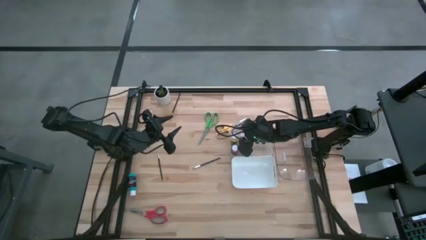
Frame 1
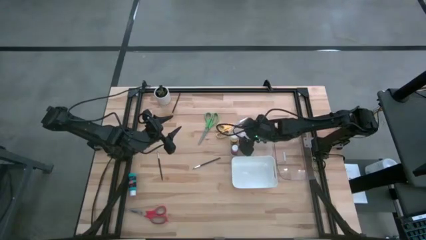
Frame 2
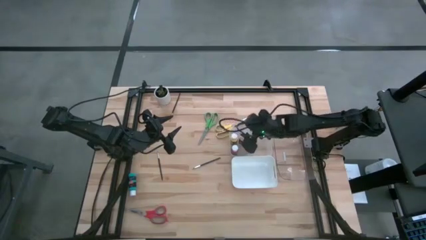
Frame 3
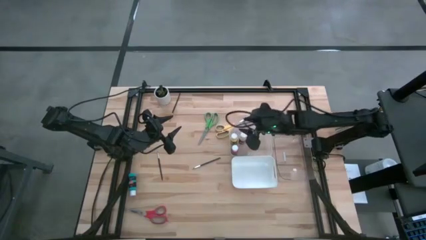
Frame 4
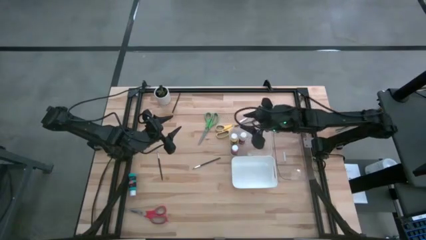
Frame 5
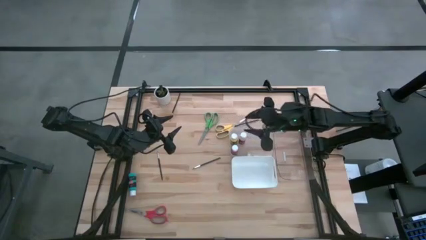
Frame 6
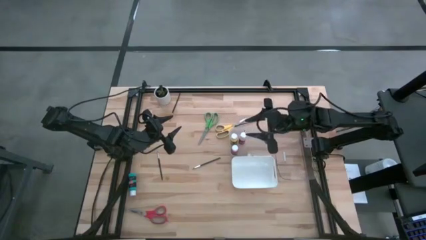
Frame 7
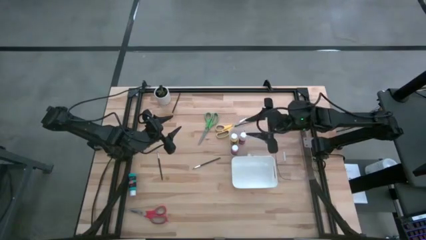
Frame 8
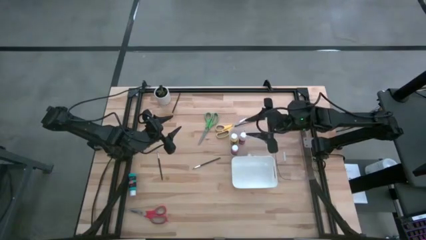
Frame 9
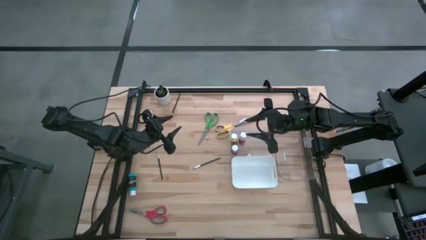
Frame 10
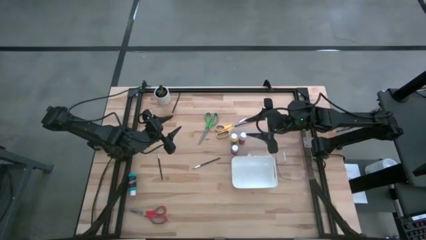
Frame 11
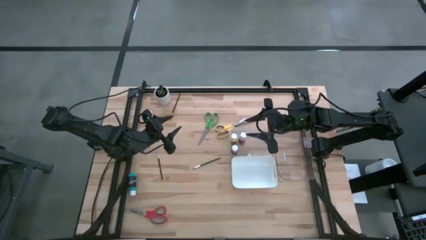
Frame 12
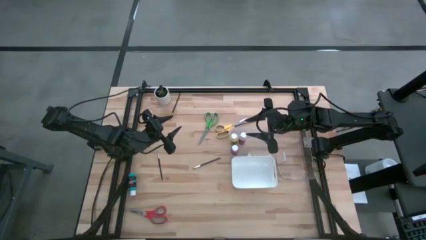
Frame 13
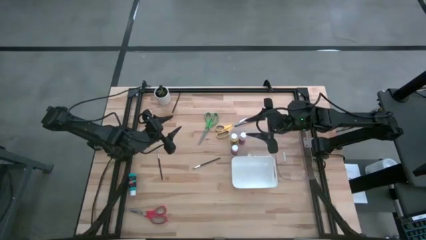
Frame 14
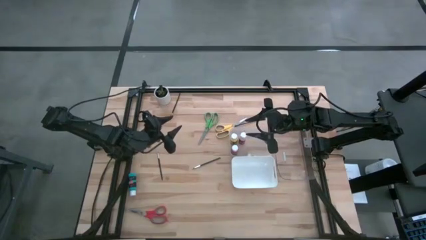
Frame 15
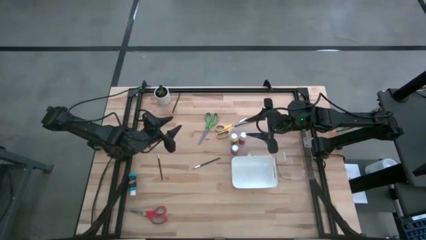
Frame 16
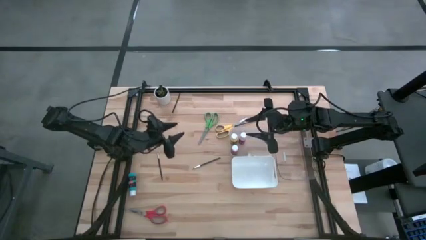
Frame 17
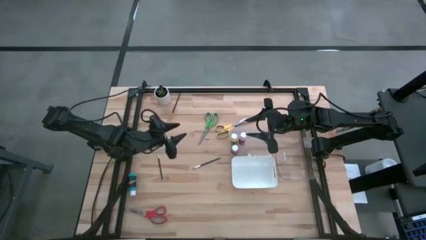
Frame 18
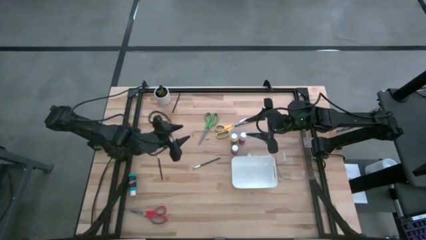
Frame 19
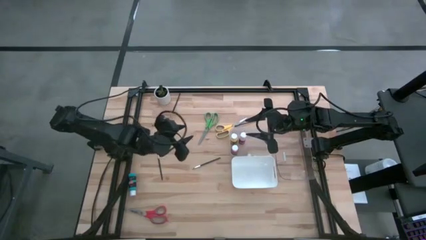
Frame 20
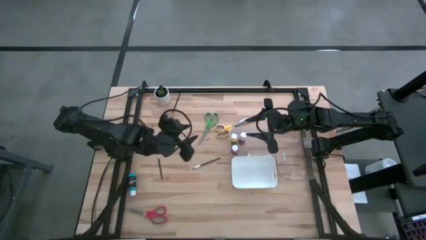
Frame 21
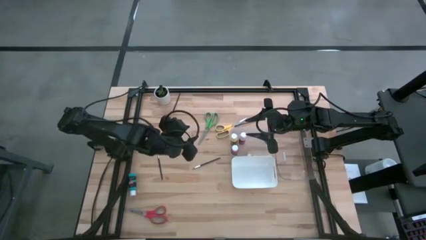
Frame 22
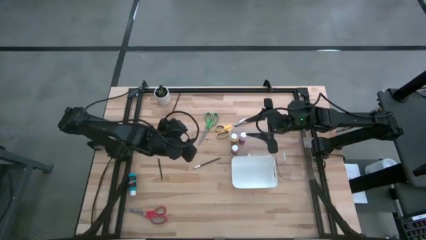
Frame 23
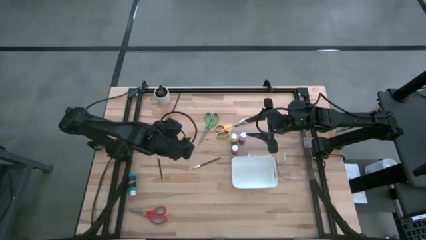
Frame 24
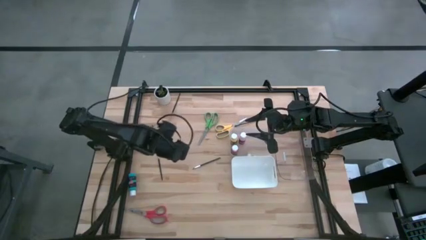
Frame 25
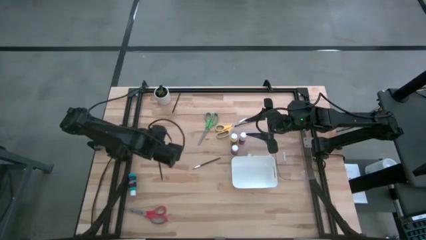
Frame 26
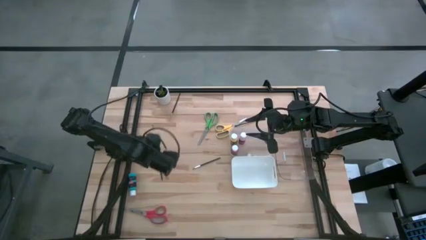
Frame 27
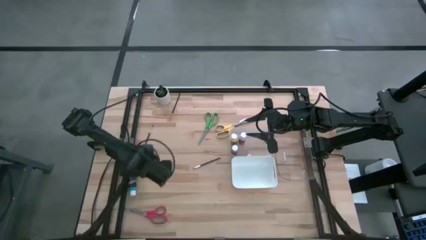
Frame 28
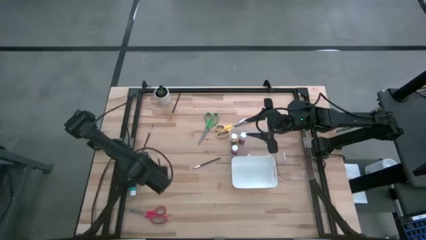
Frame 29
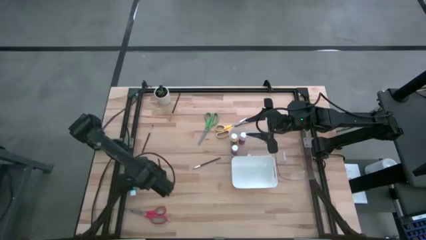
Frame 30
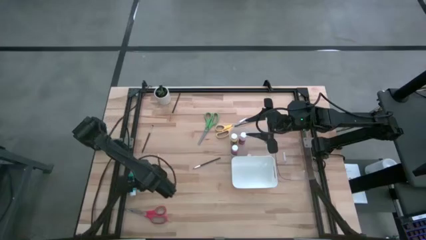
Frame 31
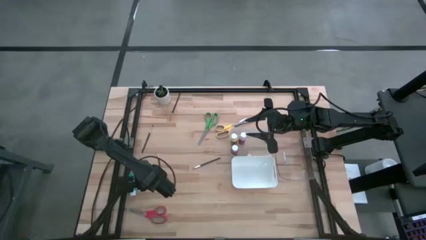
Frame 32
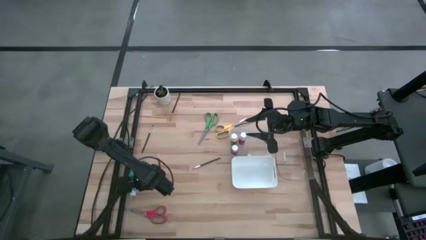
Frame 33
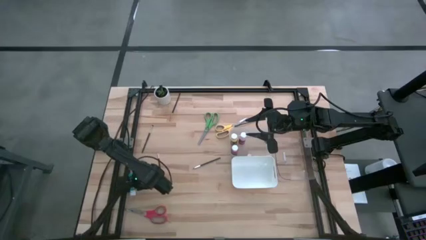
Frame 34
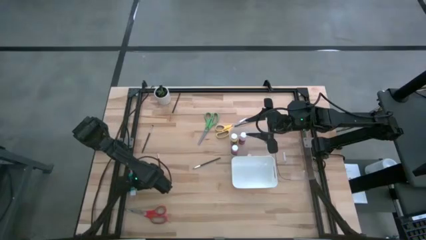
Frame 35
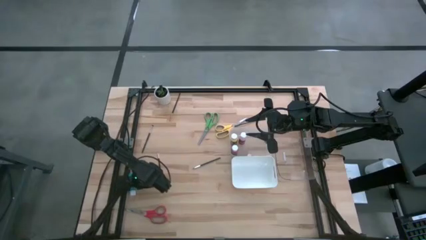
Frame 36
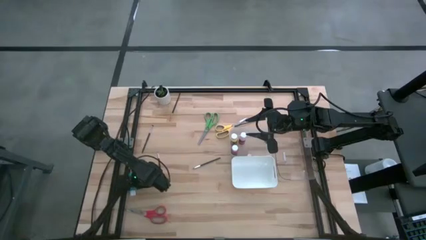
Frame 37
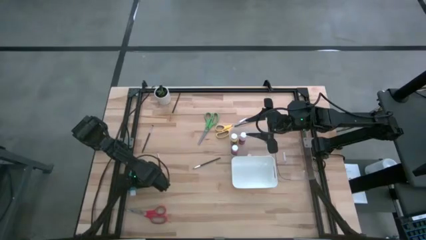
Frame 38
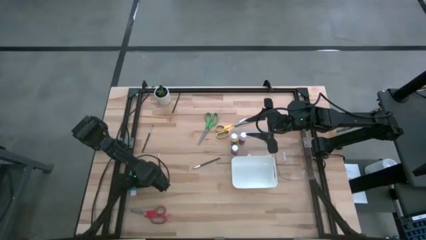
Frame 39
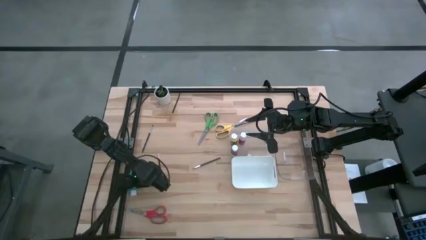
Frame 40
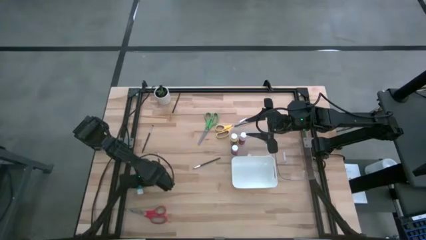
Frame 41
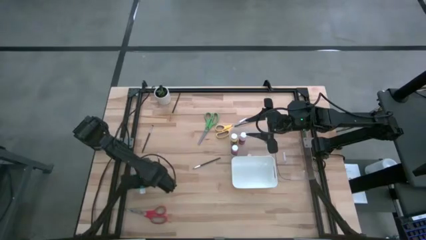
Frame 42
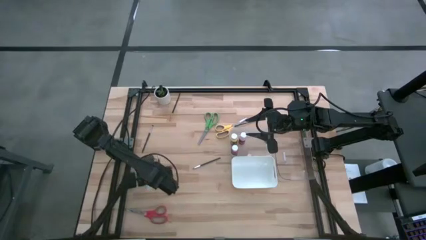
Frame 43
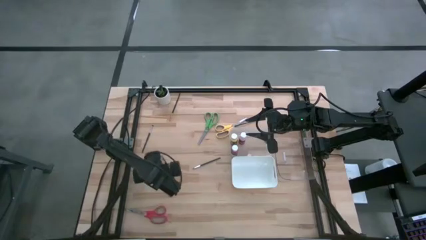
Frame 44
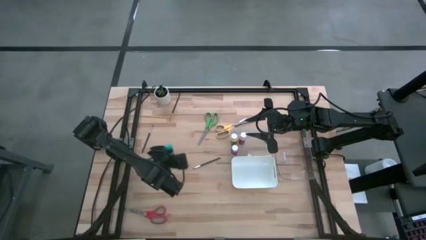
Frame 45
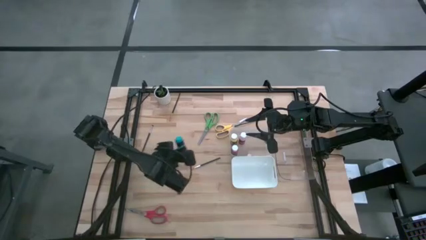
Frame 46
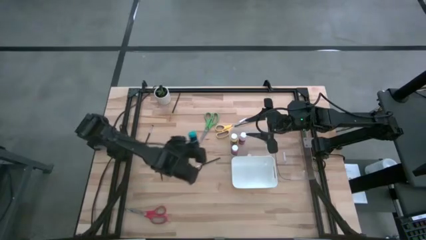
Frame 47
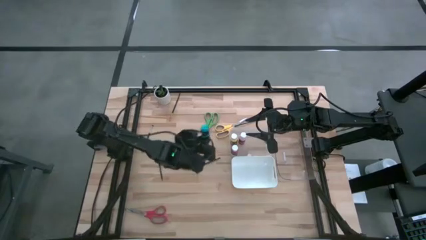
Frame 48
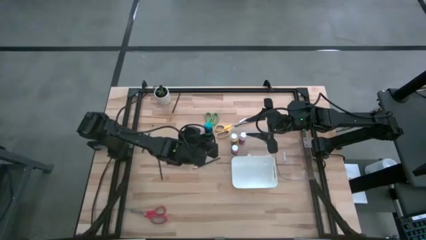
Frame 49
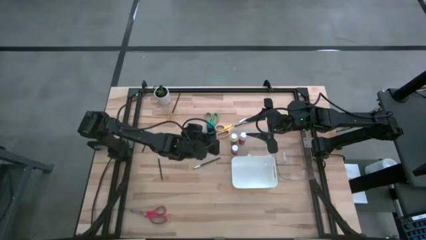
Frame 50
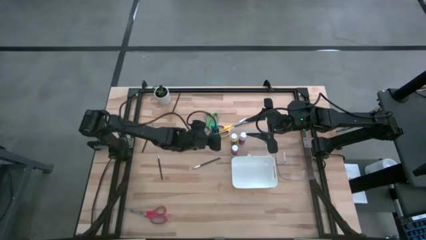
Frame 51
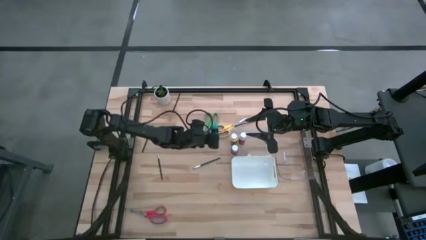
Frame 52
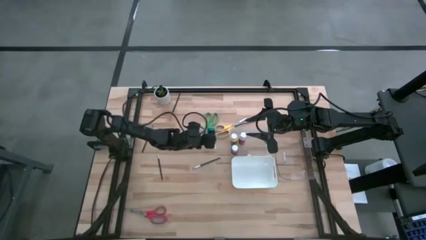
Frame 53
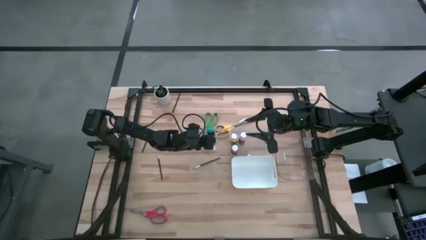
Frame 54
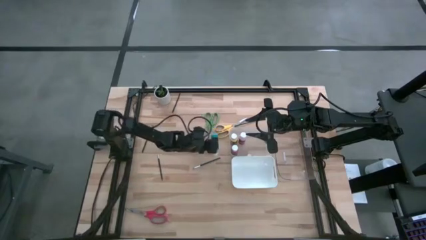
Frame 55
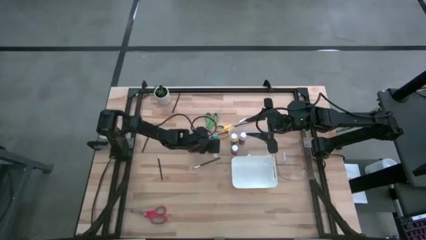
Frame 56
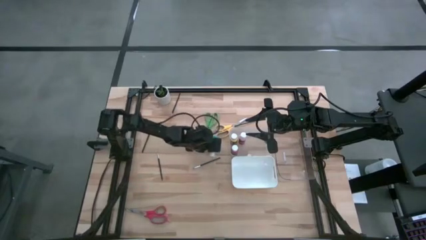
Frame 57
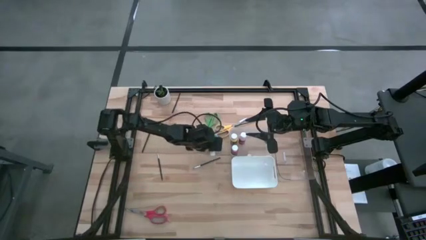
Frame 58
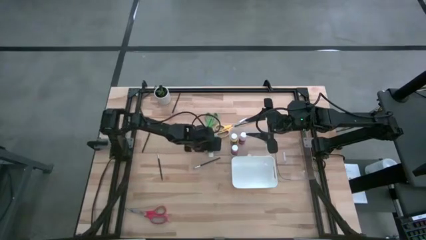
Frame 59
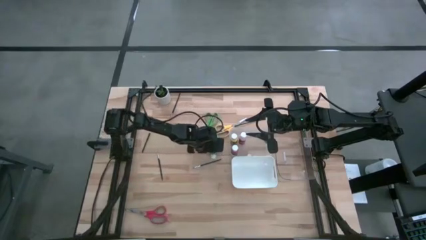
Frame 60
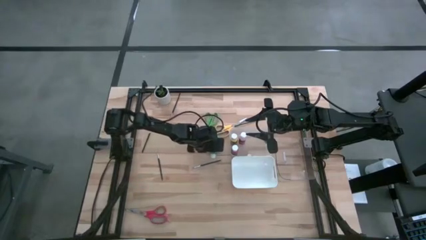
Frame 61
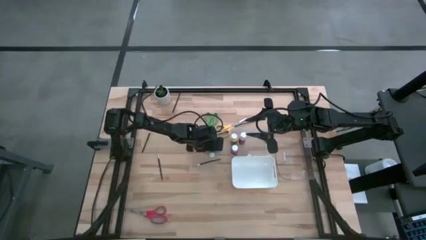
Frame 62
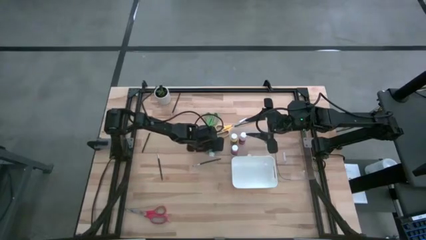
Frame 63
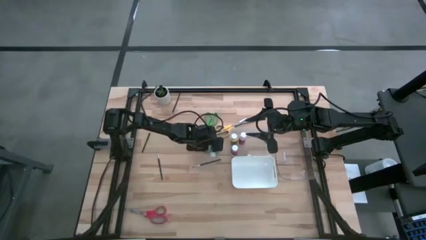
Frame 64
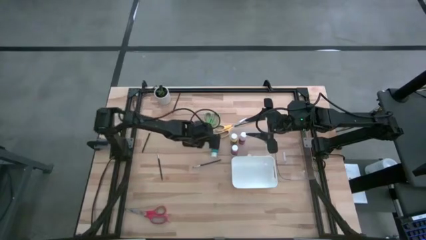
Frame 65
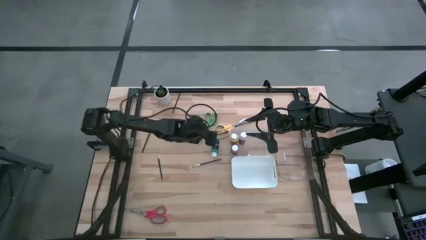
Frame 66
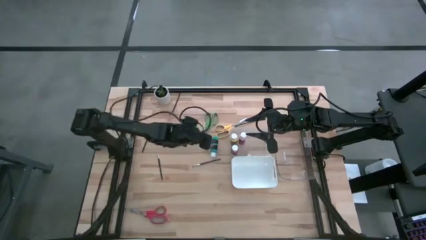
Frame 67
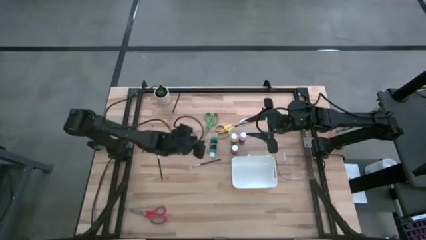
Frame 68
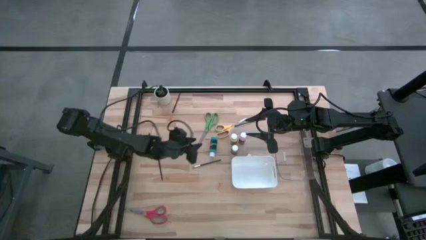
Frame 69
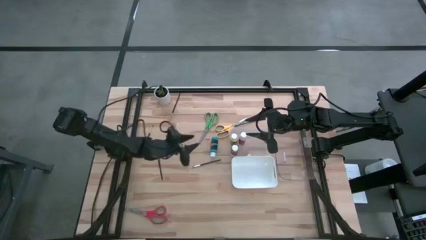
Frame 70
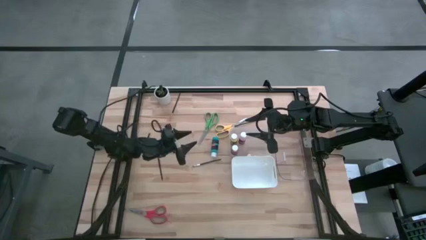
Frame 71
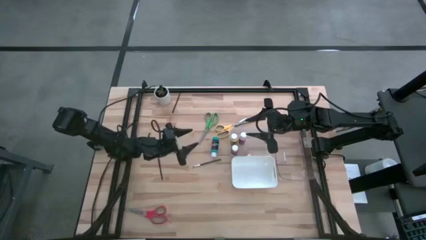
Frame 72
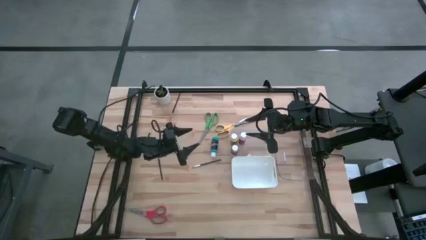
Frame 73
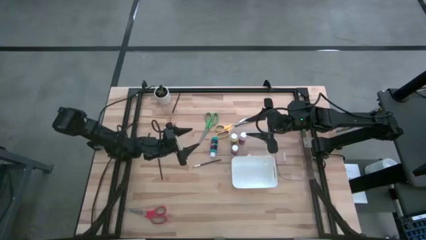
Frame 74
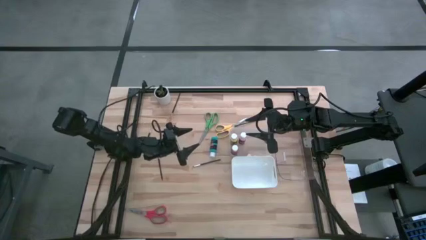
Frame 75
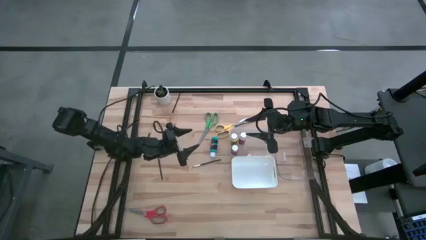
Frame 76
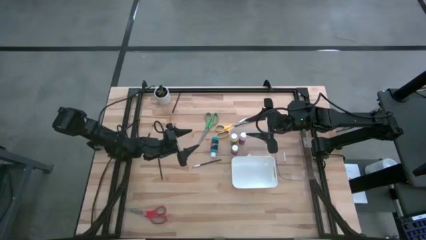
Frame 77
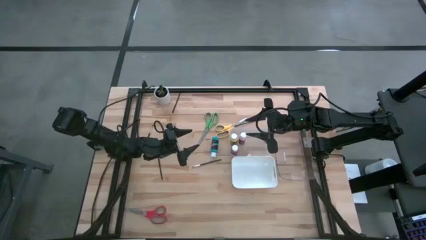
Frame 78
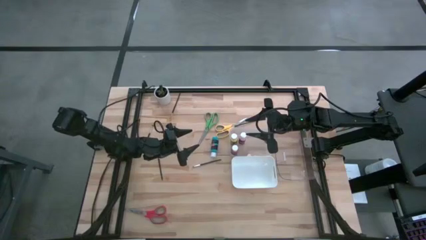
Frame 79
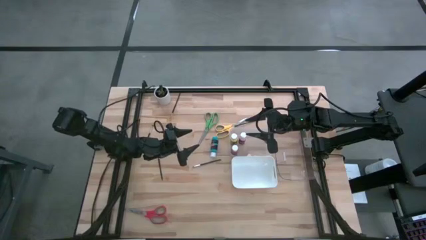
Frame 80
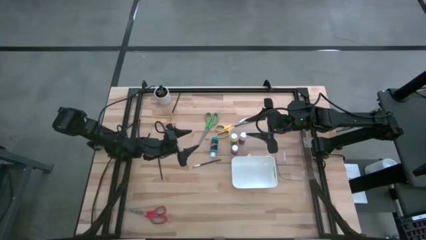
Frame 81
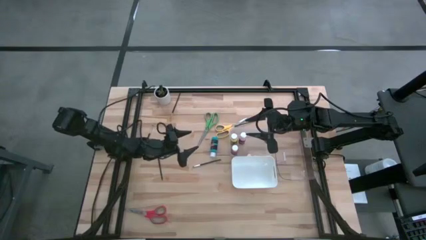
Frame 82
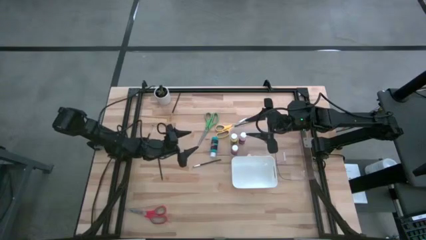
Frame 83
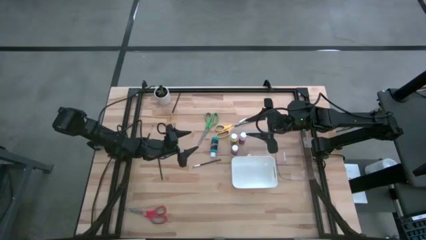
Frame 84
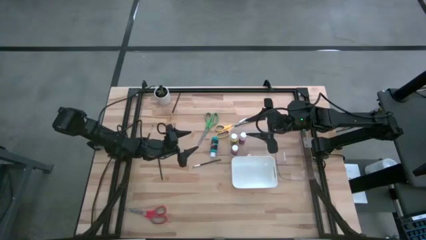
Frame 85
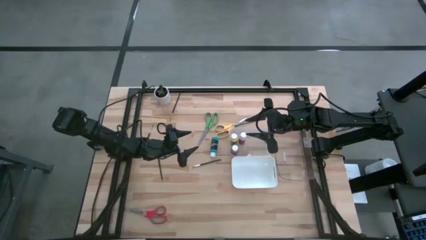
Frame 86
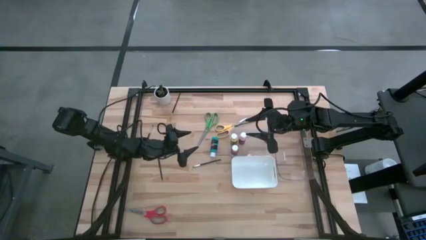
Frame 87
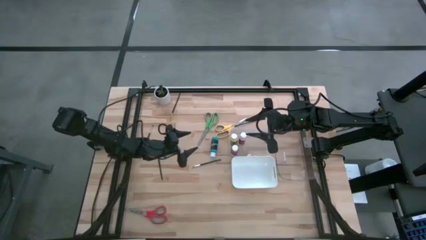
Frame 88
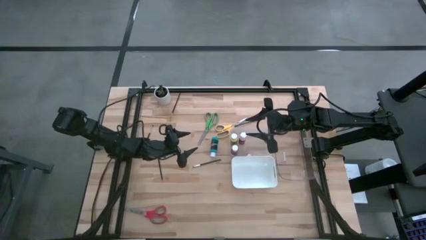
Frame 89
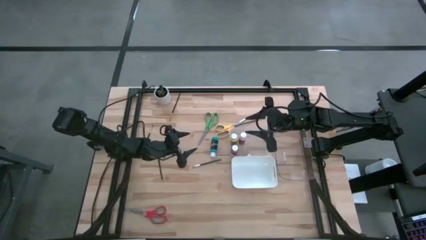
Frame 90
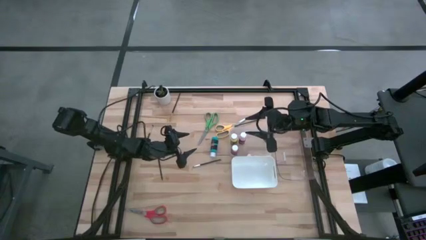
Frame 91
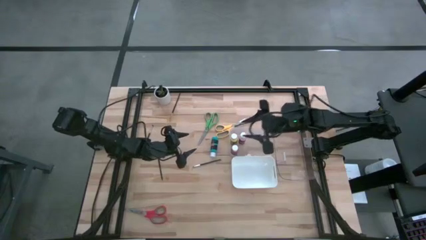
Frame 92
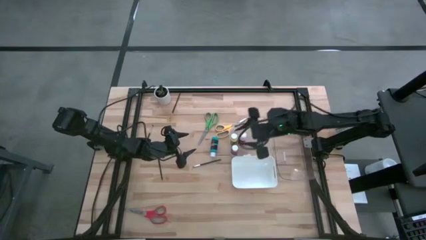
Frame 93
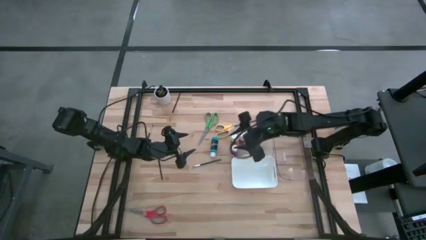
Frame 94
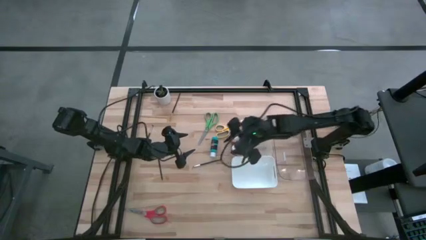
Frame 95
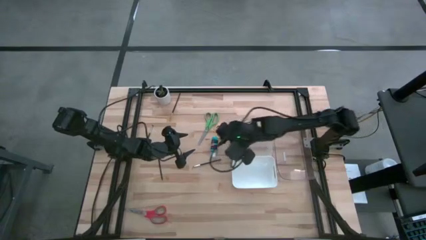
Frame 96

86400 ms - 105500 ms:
Task: Pick & Place Paint Supplies
Put the blue paint bottle into the left transparent bin
